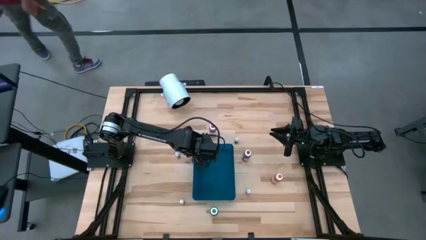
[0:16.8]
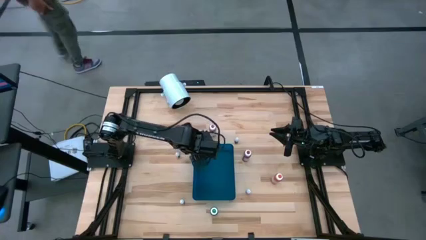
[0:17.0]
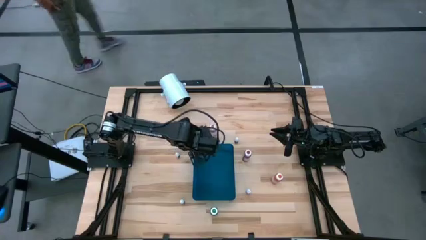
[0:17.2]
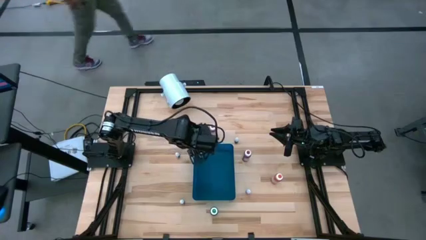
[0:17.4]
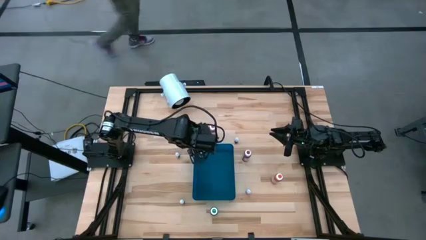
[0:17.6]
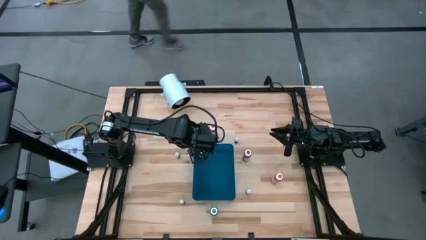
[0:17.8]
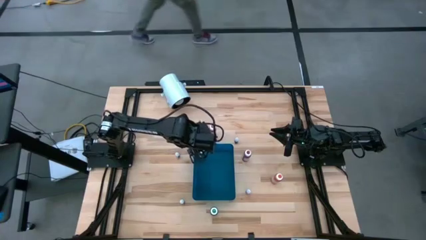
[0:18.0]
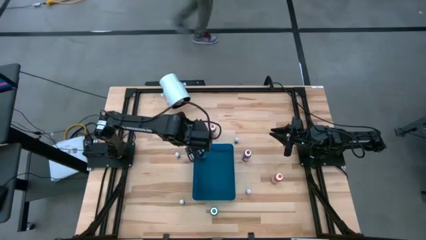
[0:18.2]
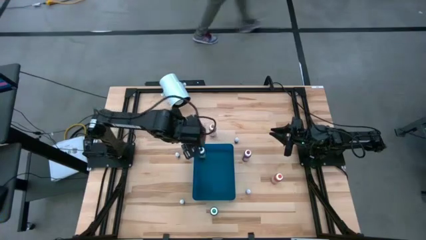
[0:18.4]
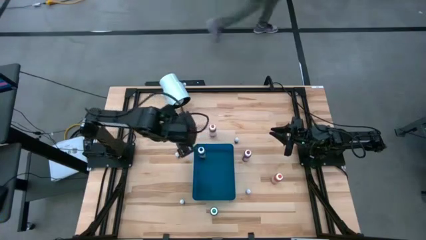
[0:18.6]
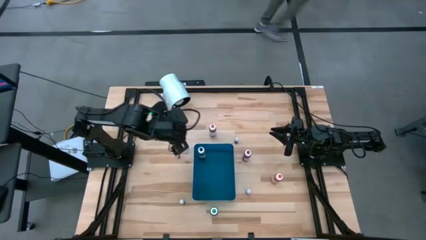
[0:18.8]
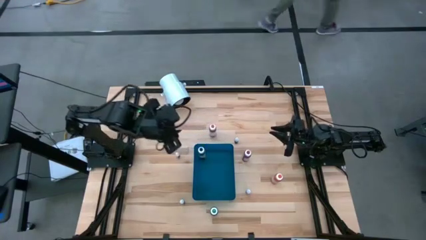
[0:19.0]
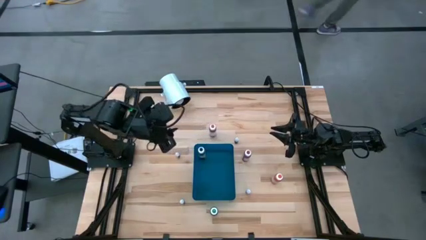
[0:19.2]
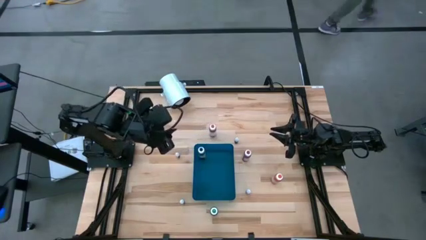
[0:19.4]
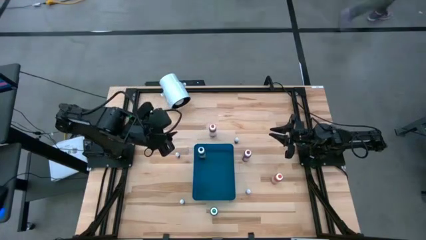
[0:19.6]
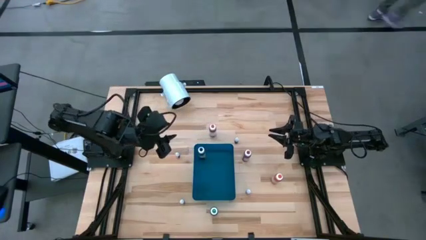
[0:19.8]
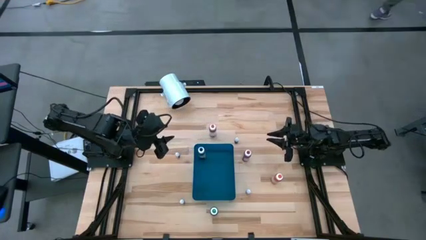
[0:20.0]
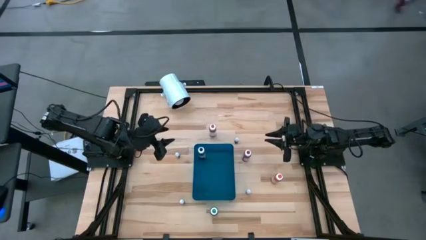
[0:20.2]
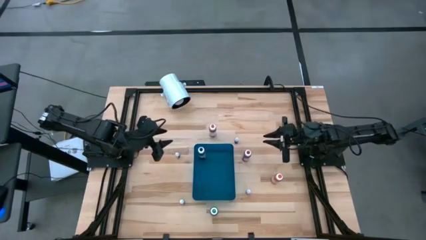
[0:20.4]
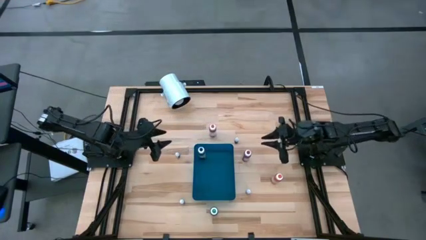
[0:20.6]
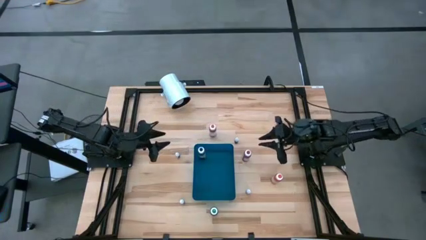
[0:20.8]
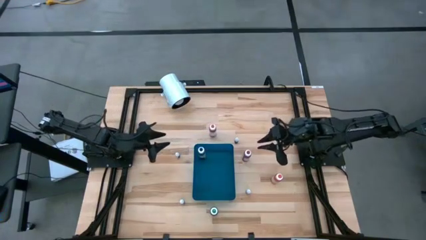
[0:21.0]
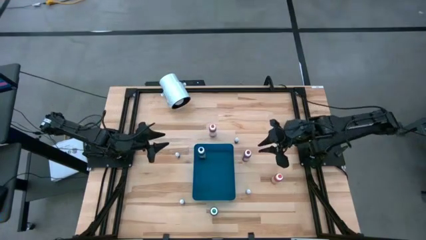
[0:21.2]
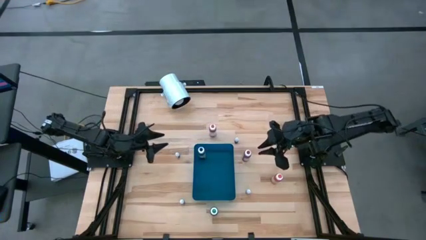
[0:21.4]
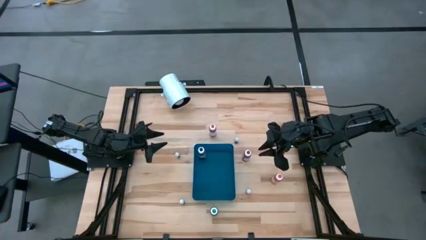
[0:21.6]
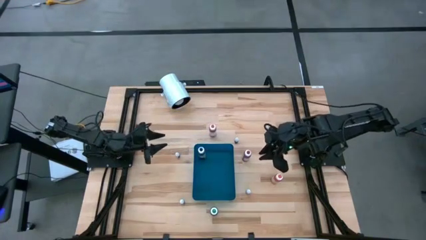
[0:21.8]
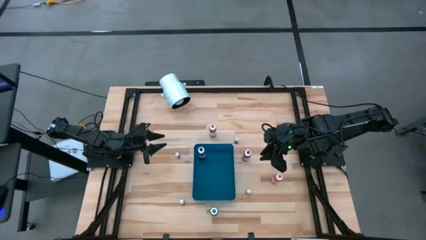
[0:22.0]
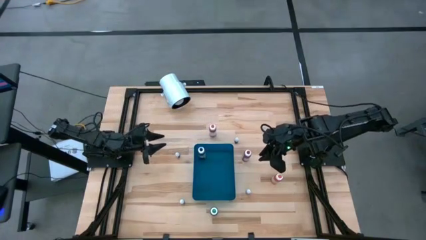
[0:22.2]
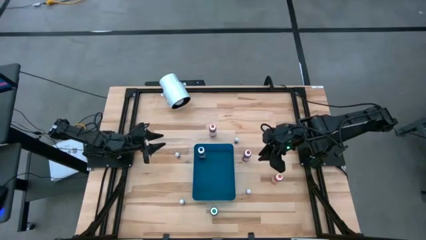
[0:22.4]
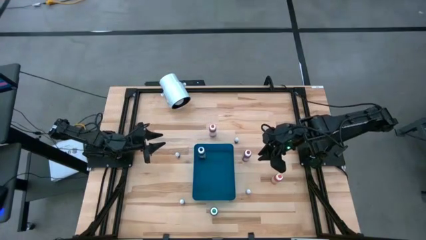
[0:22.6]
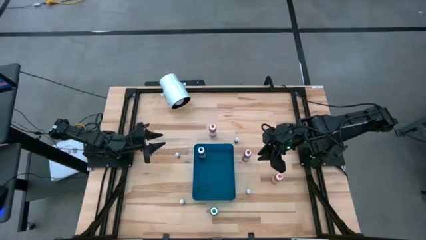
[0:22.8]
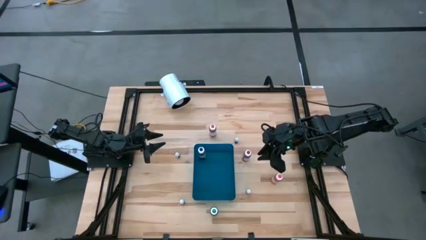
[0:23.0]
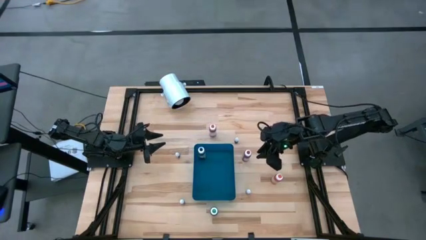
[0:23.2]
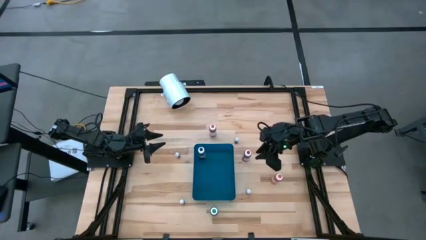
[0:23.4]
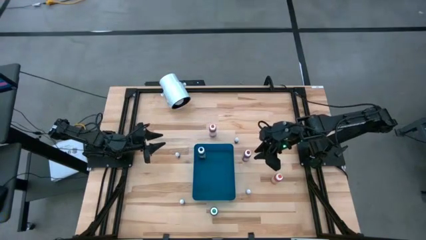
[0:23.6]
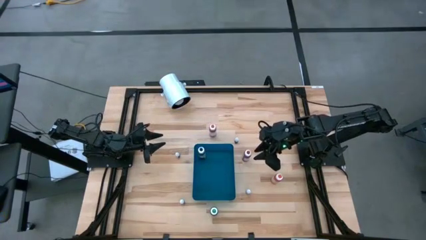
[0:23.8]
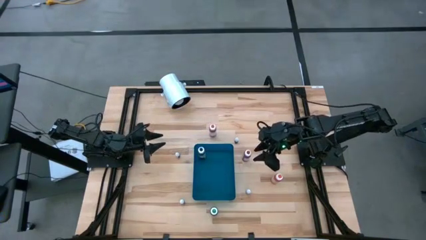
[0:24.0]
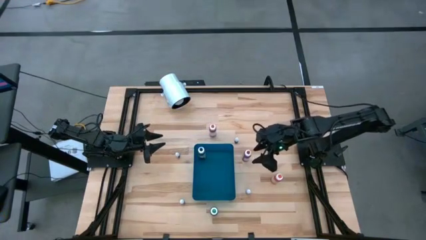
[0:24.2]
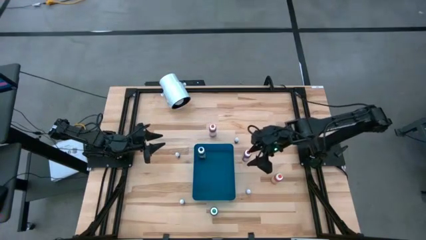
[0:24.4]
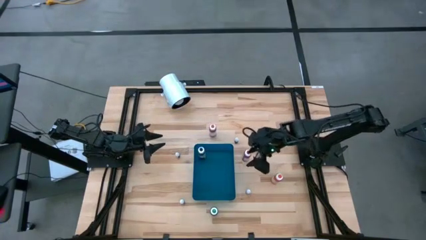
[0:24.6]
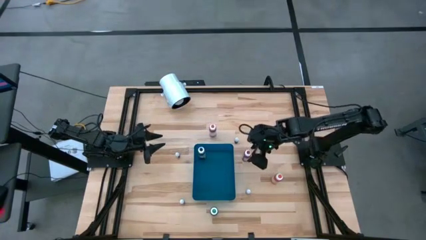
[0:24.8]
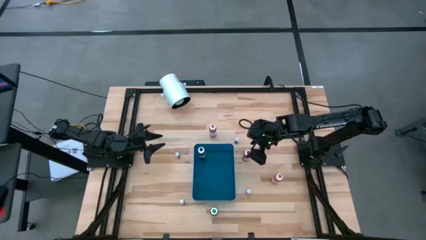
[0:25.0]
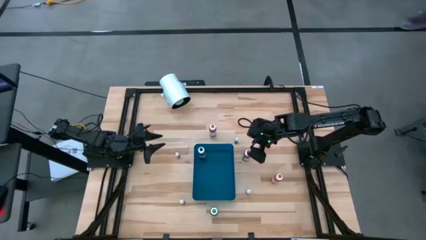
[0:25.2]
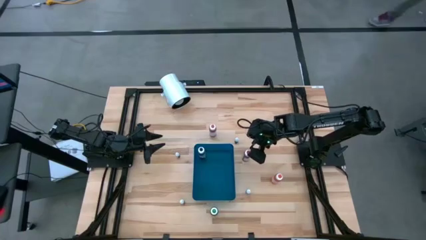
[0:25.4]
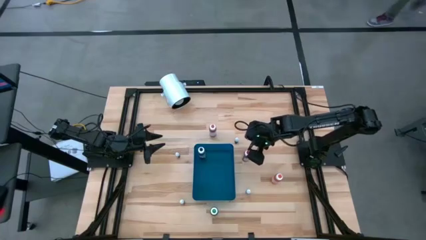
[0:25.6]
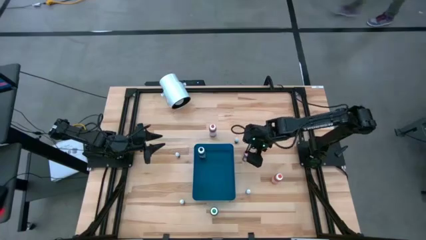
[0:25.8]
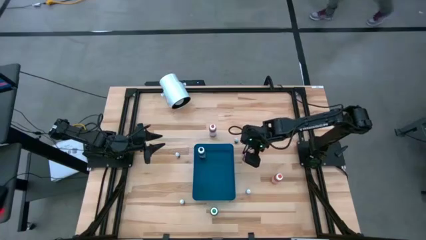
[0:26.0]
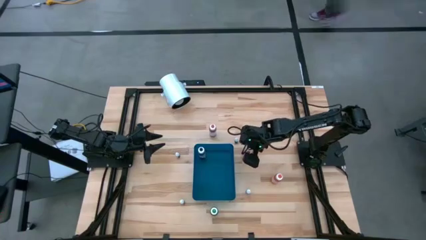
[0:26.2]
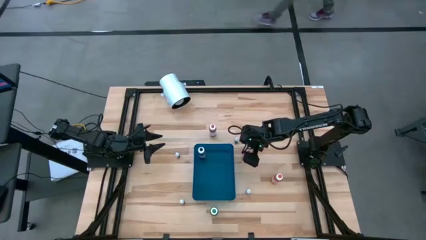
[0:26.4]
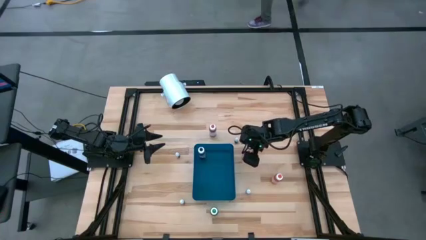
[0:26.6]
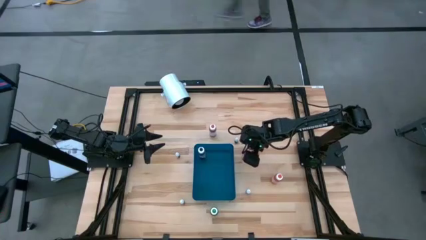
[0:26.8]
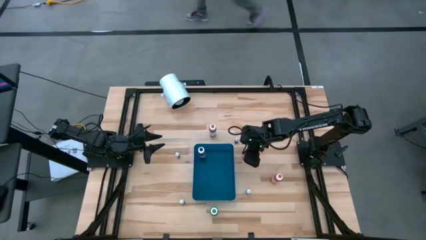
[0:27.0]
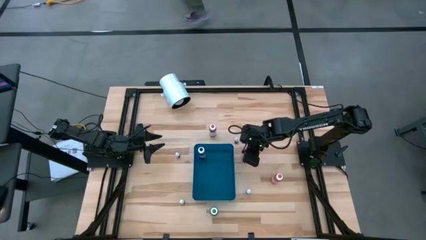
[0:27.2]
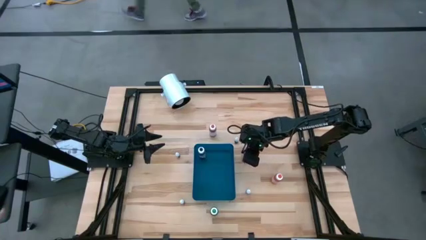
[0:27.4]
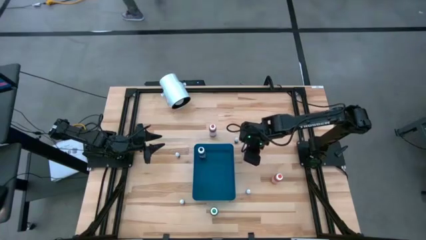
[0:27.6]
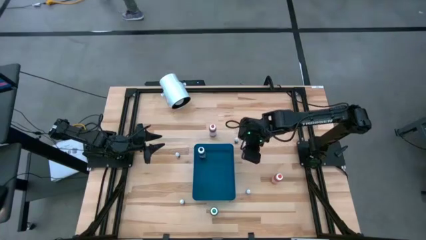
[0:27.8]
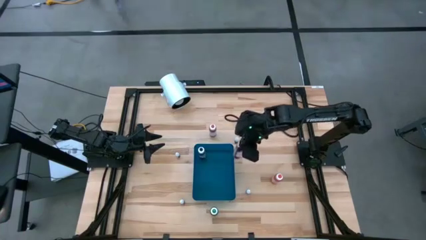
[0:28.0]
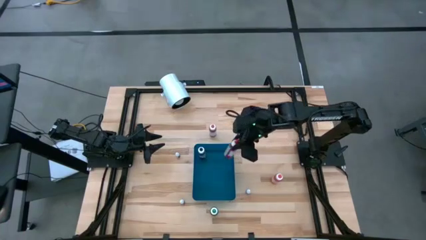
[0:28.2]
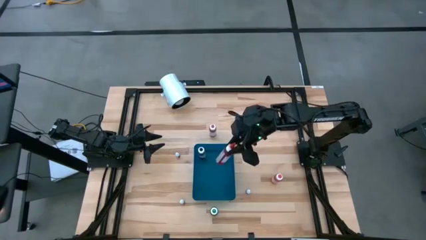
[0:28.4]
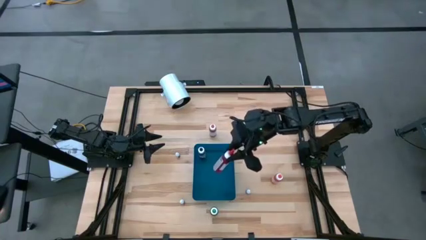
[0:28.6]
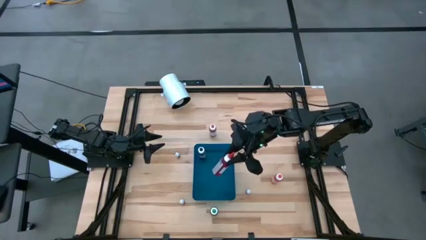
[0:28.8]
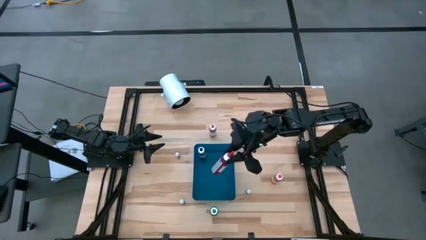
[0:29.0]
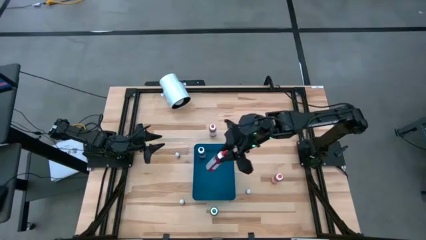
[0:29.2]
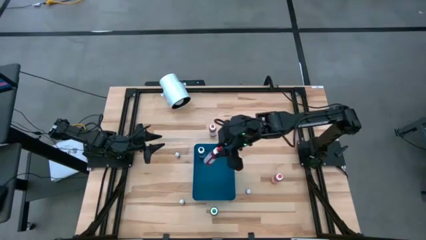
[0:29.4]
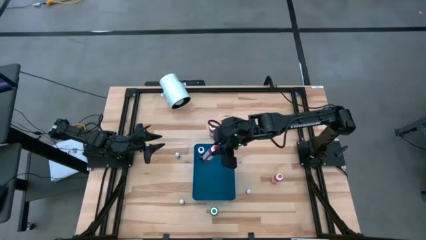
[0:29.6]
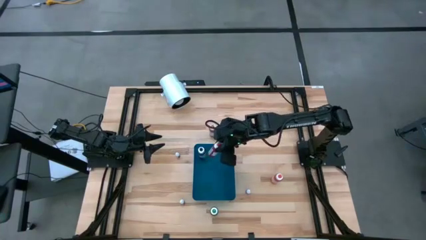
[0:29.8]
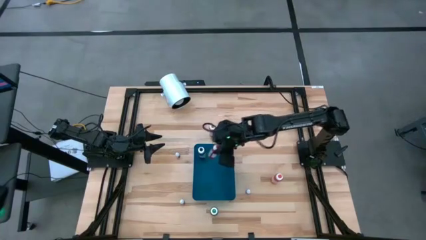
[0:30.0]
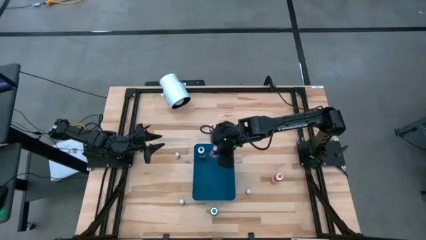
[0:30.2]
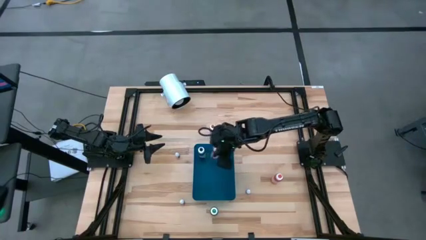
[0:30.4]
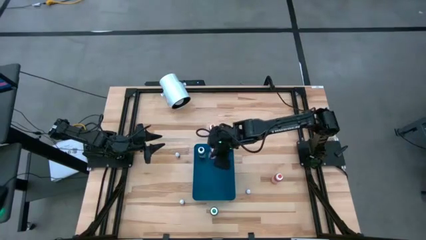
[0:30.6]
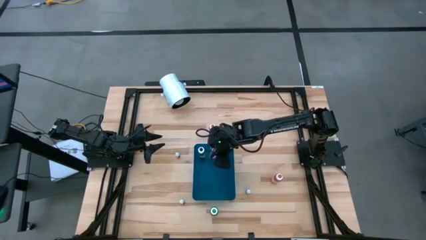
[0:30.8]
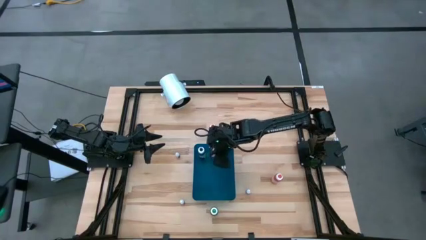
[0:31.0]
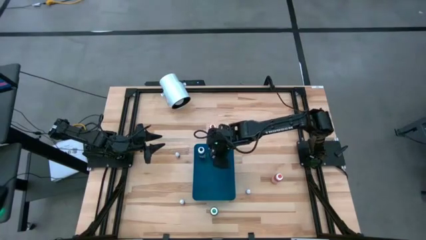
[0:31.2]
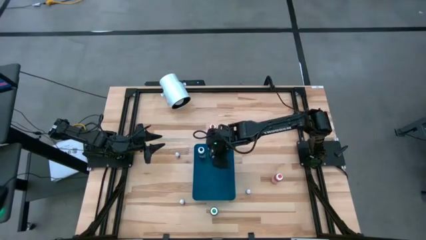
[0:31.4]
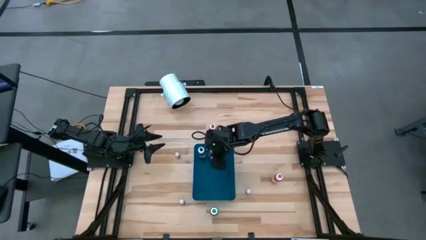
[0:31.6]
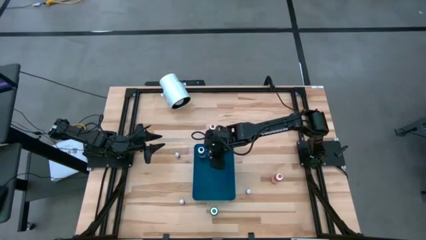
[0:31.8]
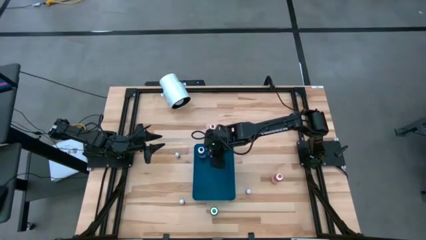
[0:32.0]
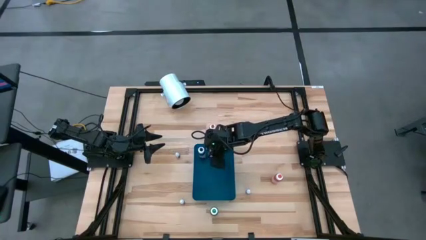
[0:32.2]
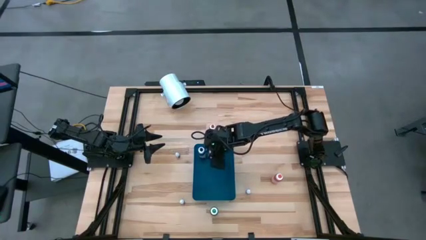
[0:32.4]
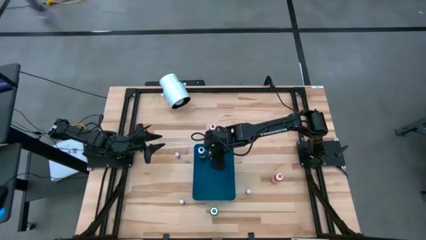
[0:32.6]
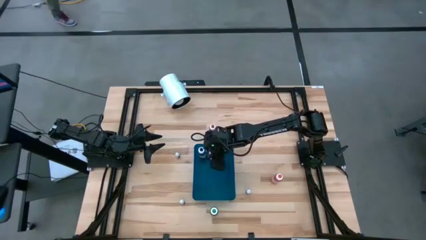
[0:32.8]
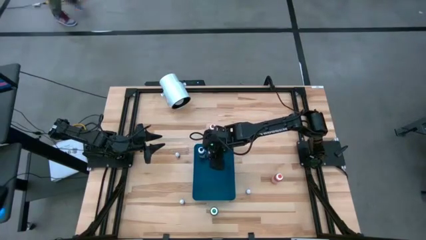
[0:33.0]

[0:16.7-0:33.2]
Task: Pick & Place food coloring
Put the large red food coloring bottle into the blue bin
